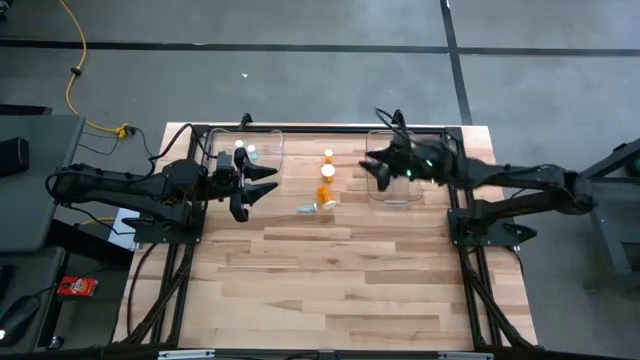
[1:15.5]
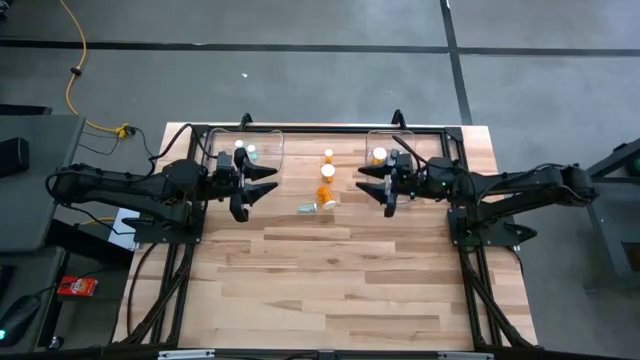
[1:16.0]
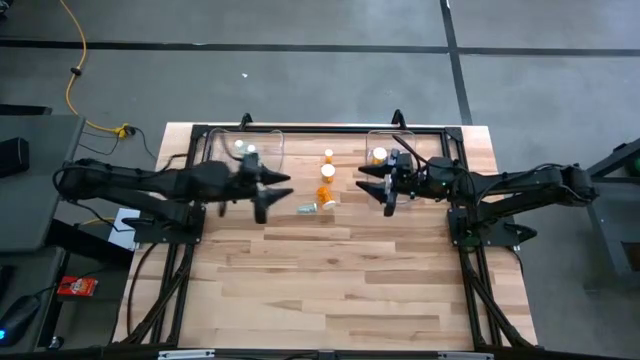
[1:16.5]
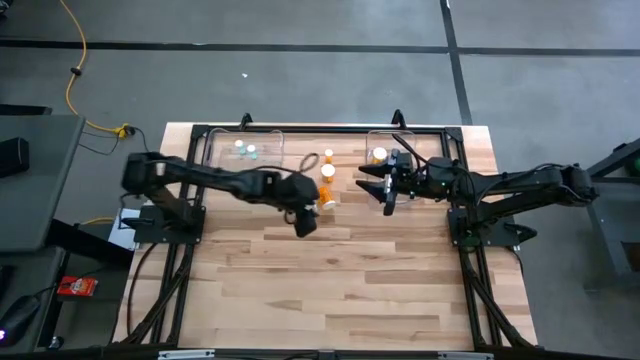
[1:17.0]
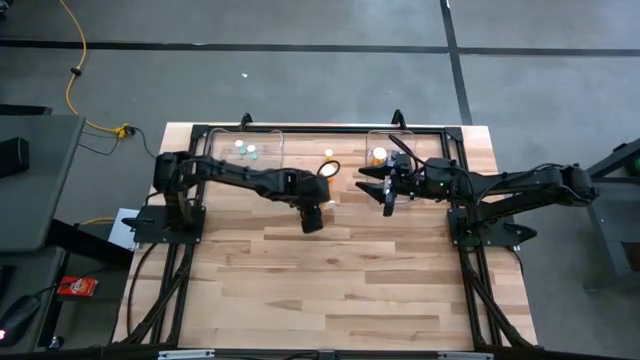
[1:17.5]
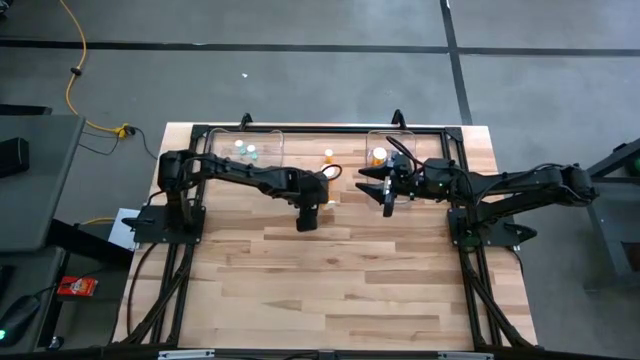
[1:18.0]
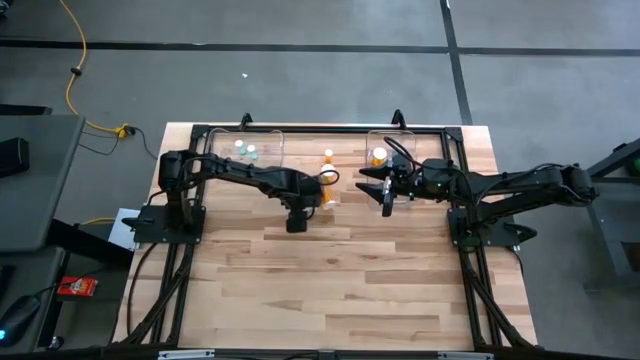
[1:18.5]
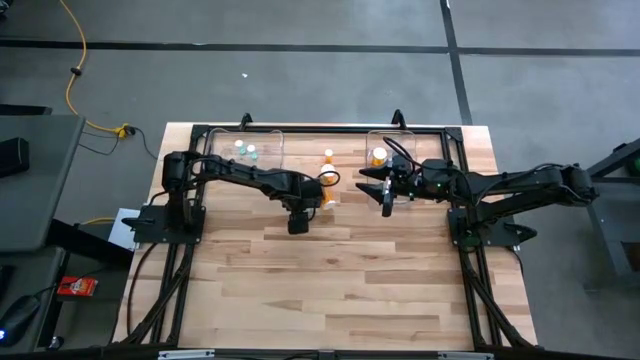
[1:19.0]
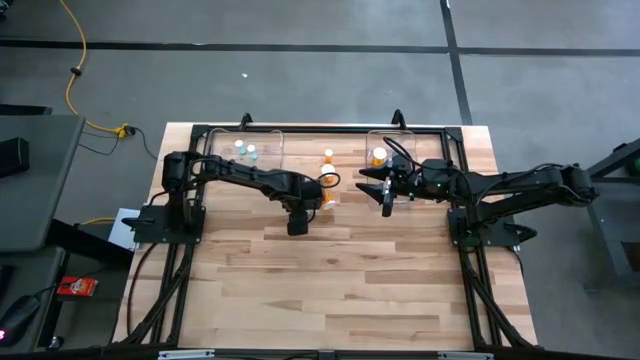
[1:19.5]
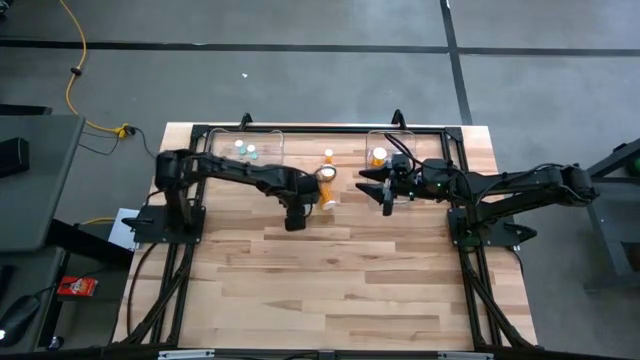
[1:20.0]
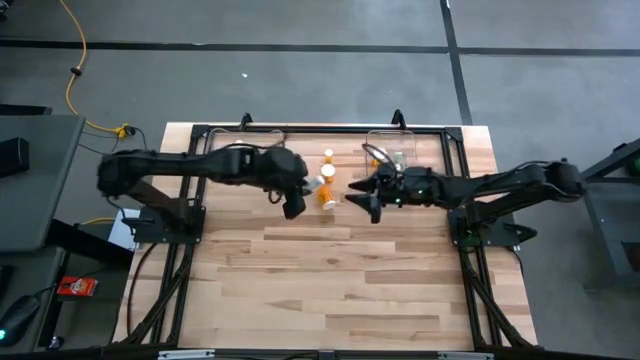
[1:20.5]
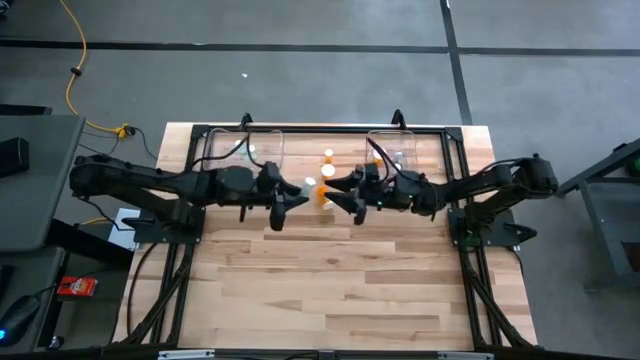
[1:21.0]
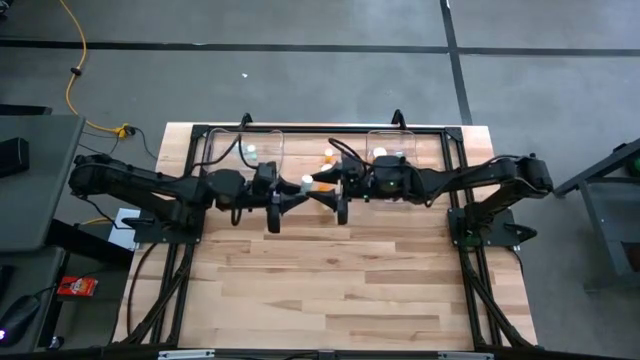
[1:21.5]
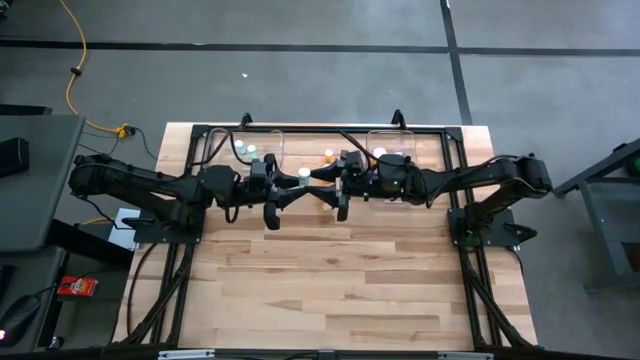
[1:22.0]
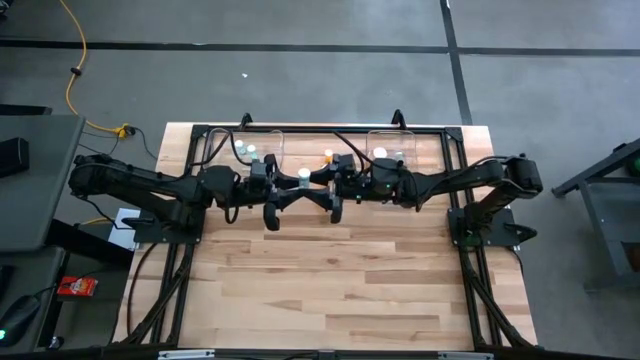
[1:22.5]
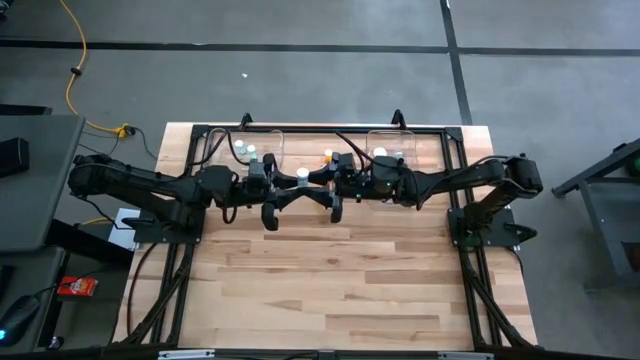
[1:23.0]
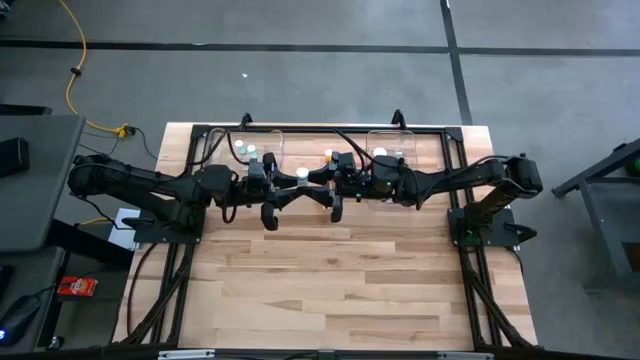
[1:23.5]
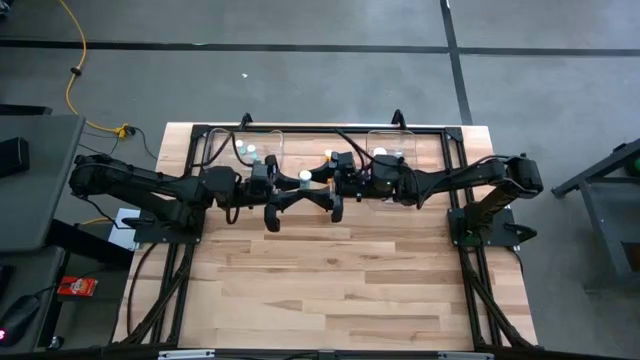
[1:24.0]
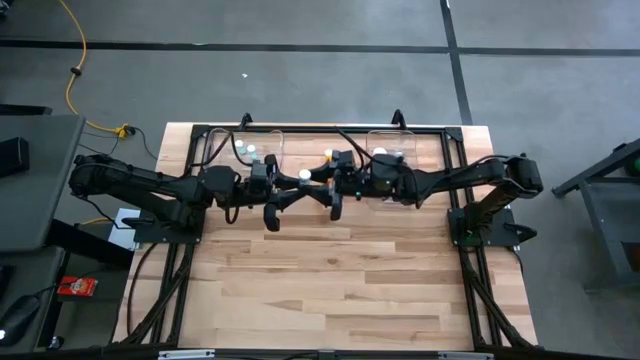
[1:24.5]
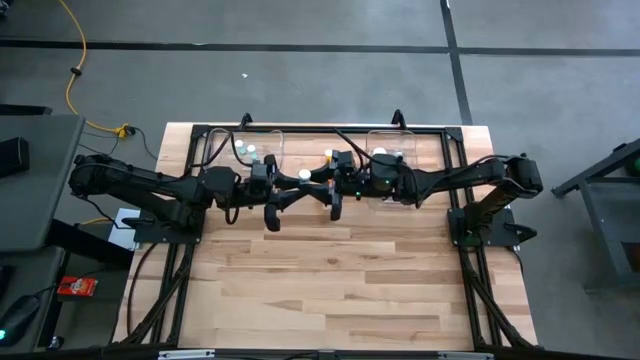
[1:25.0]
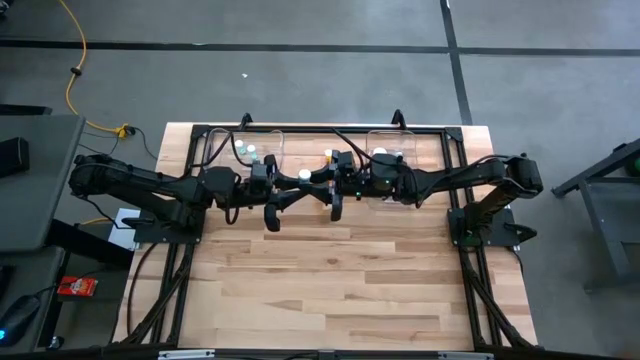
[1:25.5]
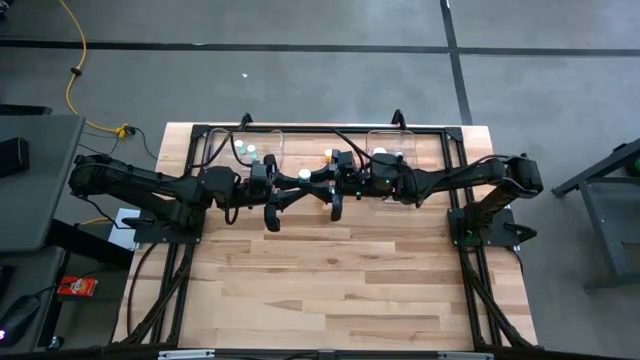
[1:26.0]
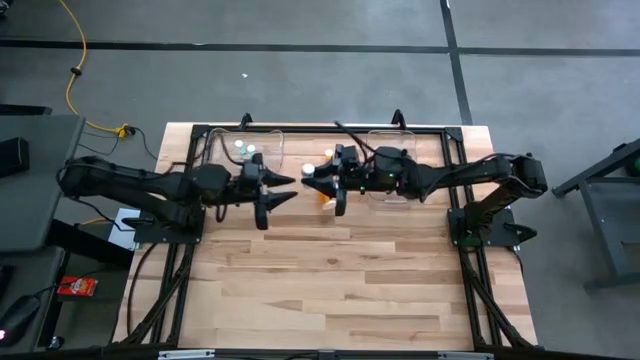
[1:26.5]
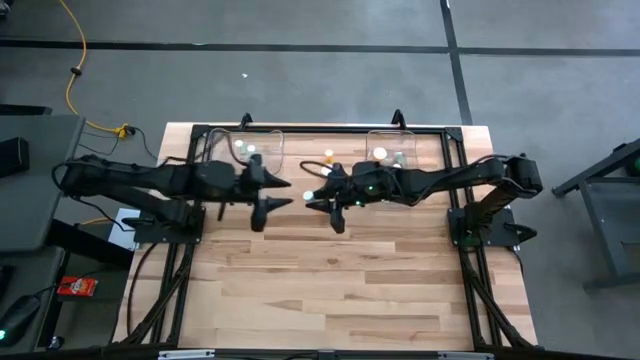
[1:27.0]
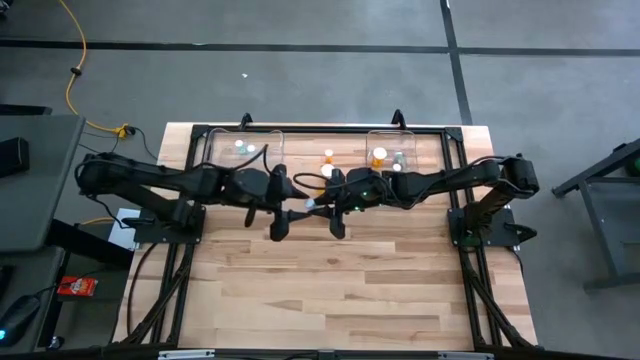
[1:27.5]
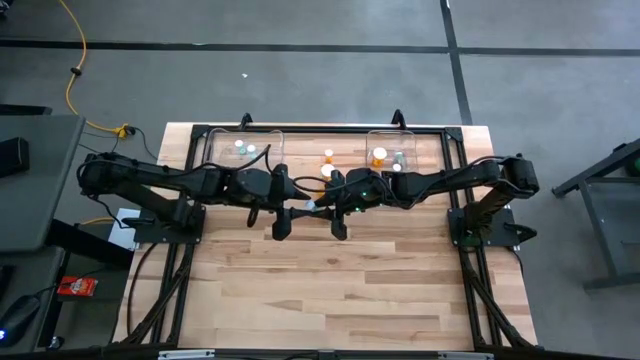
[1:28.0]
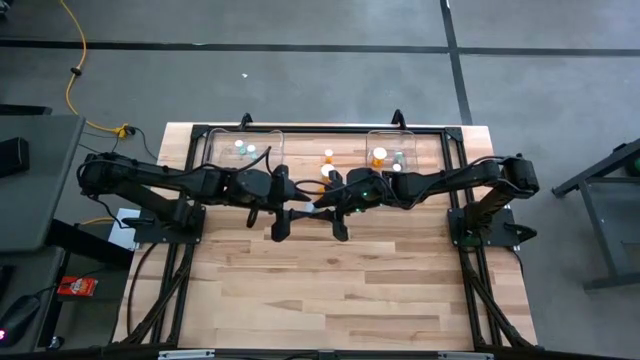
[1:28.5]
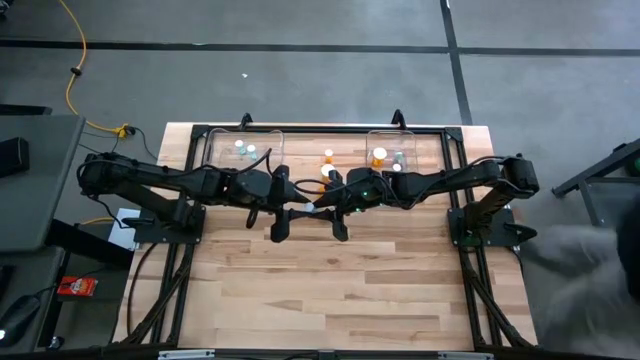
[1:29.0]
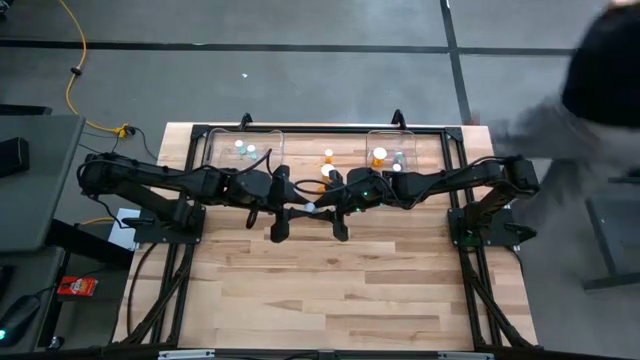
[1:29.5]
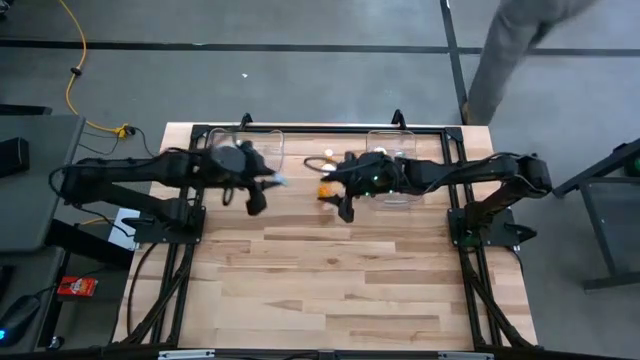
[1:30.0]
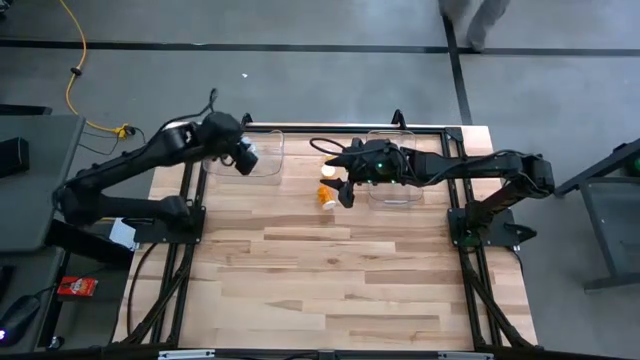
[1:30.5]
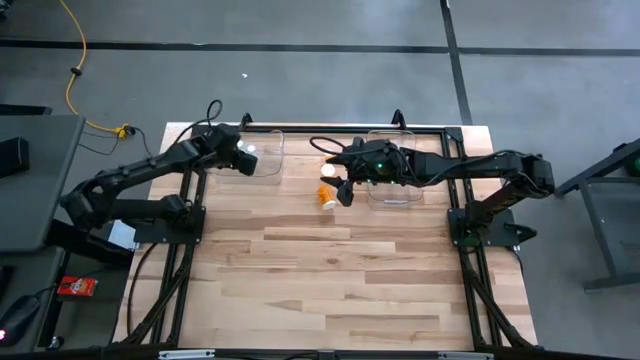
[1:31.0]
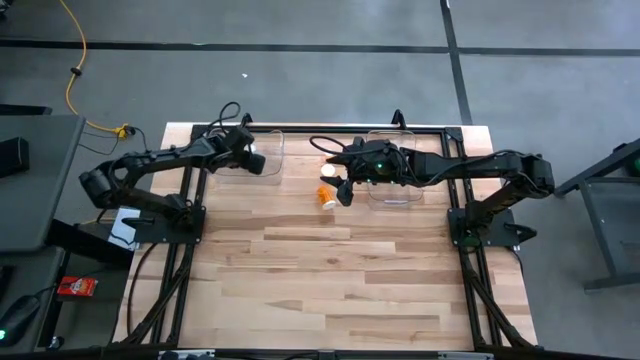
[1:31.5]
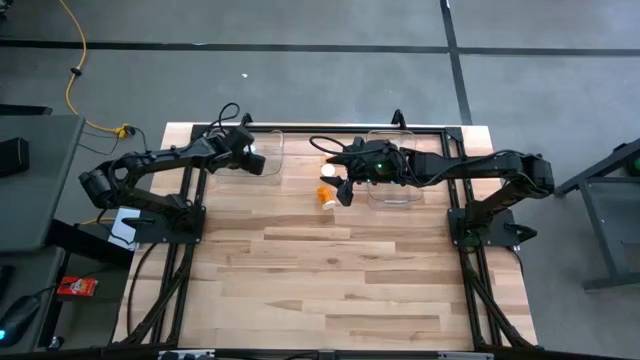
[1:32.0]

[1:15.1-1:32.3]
Task: Pick and place medicine bottles into bin by pill shape (circle, oval)
Put the blue tablet bottle into the left transparent bin

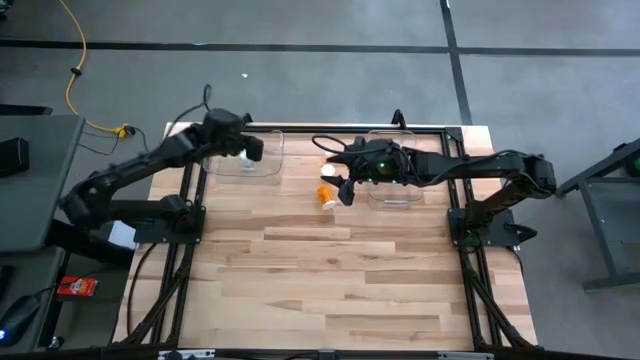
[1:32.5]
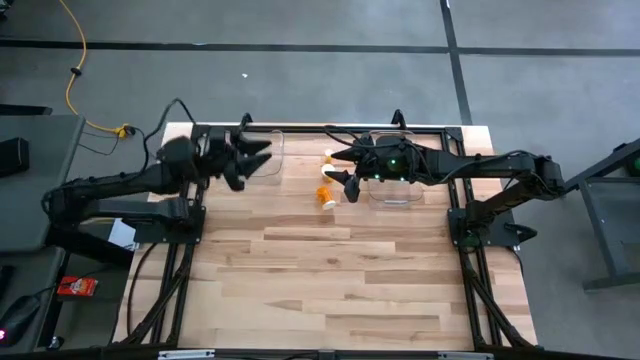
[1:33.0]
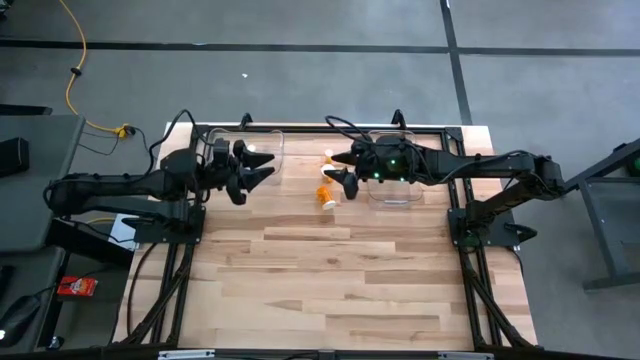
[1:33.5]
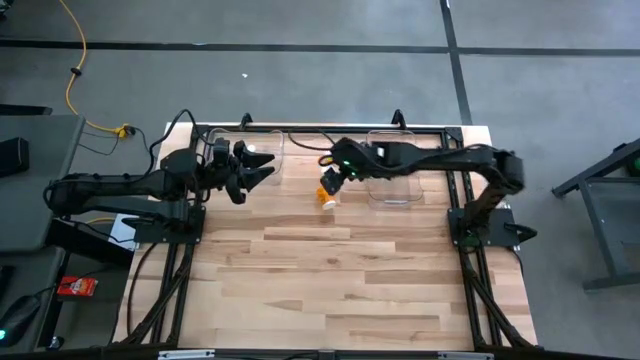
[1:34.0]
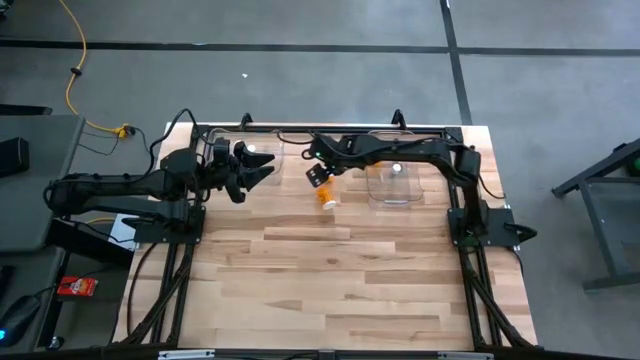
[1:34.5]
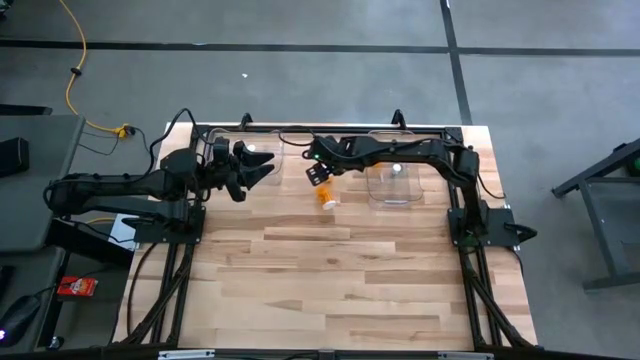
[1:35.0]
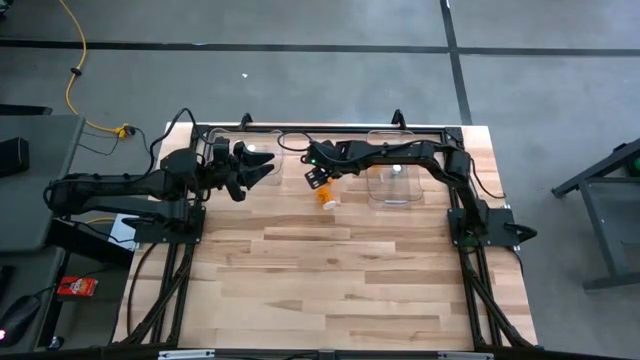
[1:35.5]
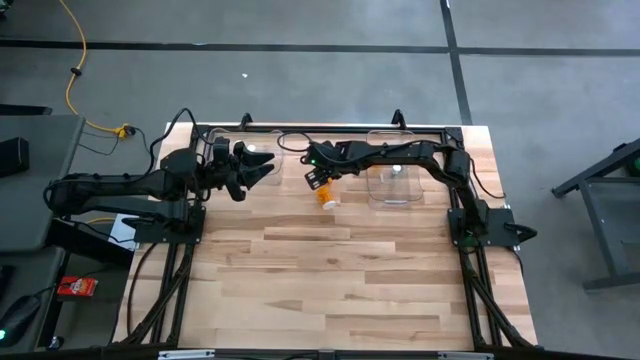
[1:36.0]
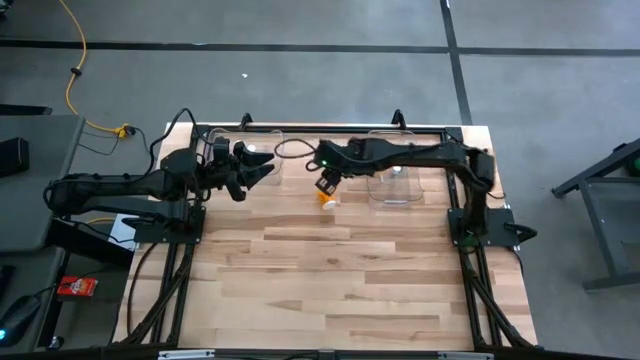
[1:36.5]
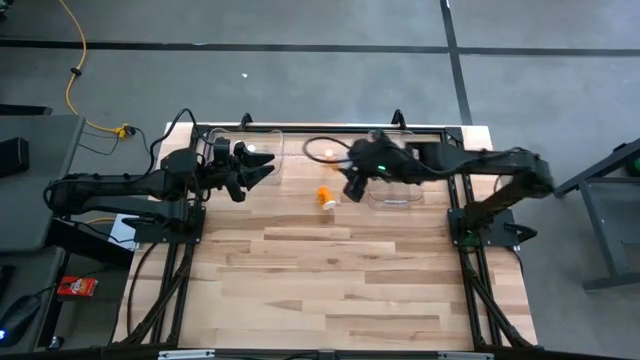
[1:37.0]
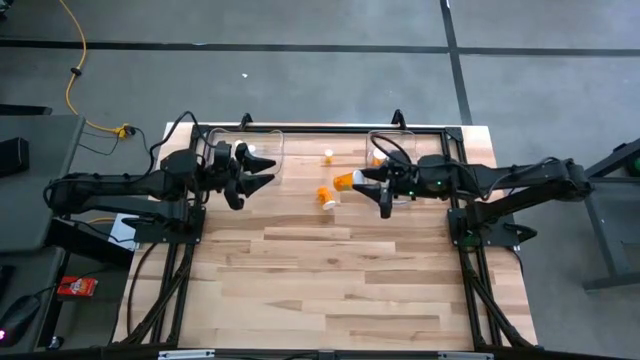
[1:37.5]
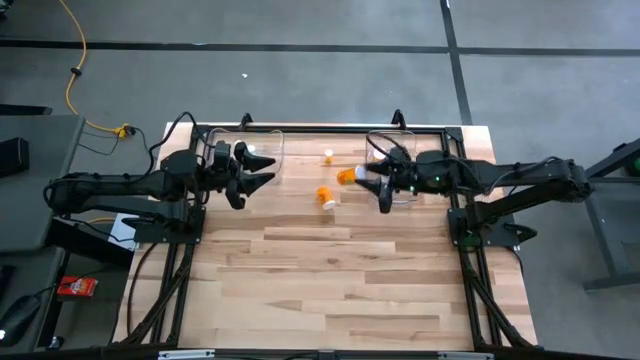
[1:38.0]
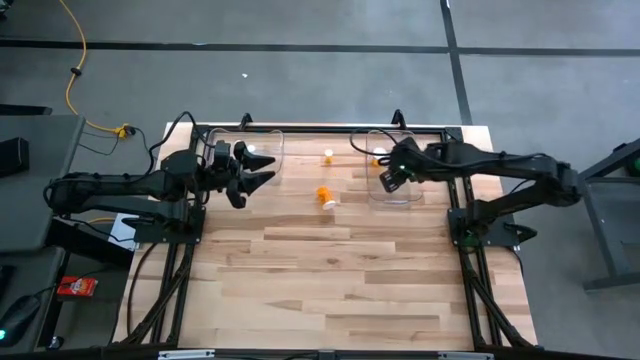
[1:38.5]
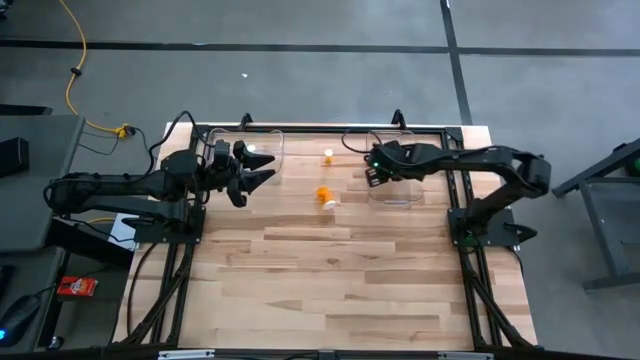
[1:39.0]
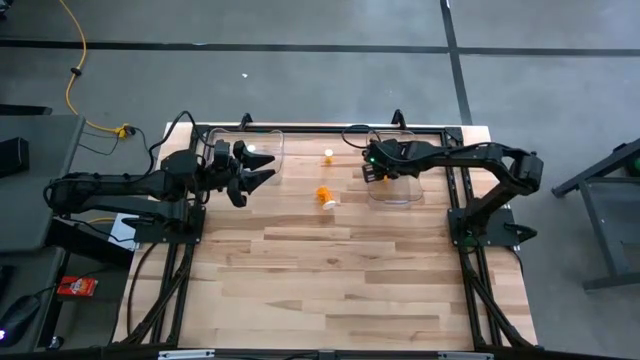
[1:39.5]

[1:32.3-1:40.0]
Put the top orange capsule bottle into the right transparent bin
